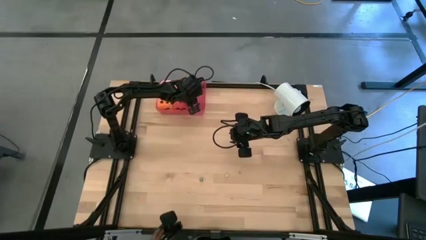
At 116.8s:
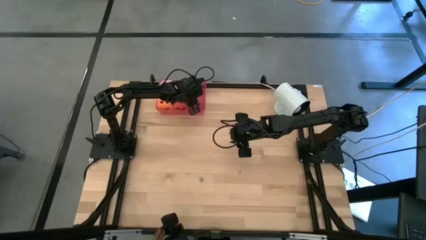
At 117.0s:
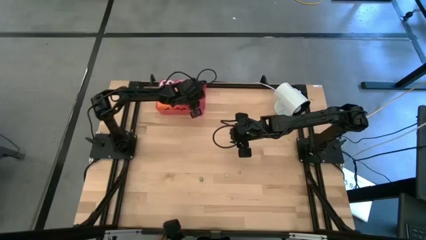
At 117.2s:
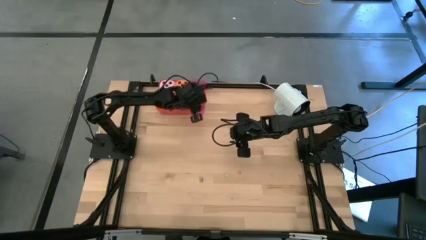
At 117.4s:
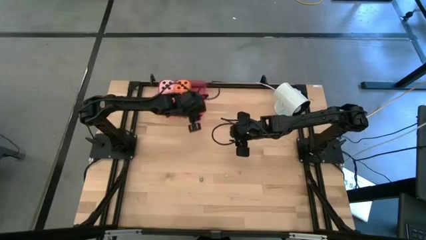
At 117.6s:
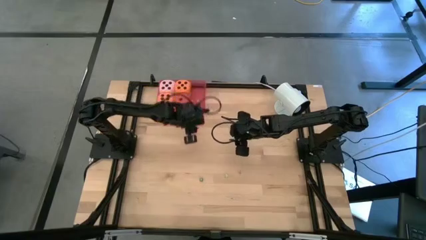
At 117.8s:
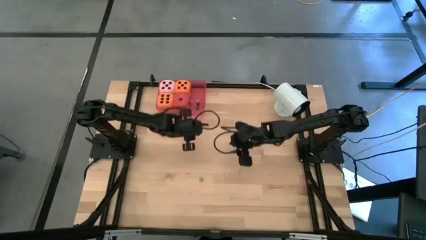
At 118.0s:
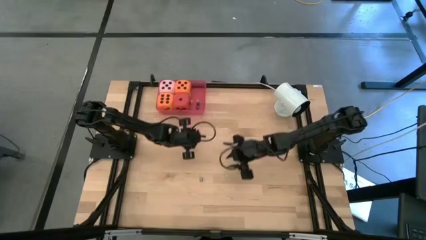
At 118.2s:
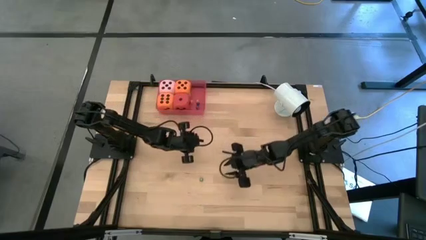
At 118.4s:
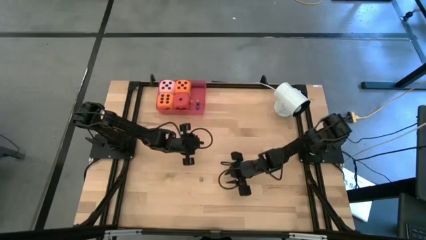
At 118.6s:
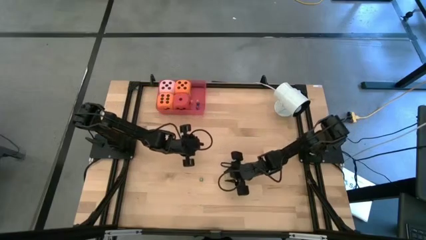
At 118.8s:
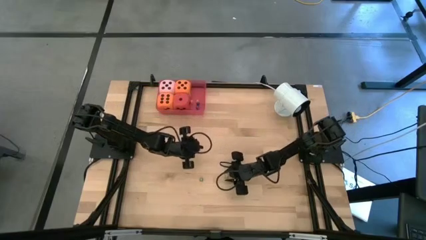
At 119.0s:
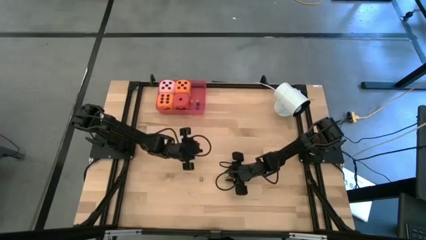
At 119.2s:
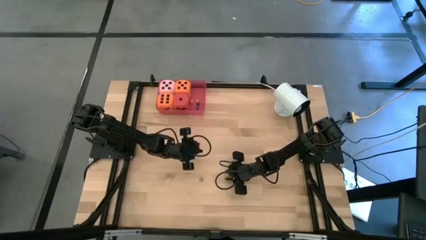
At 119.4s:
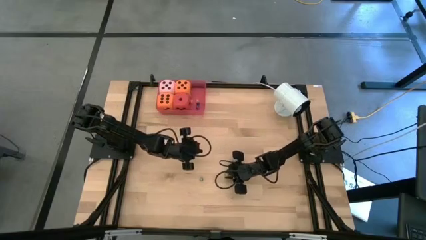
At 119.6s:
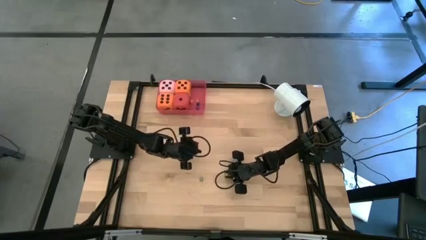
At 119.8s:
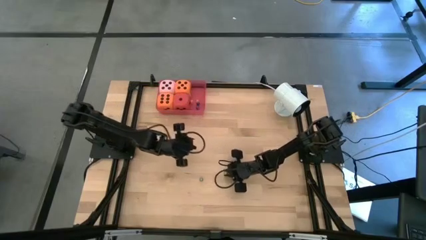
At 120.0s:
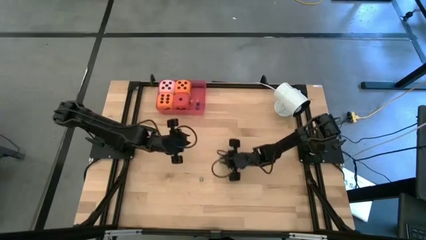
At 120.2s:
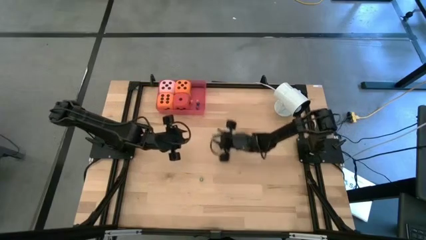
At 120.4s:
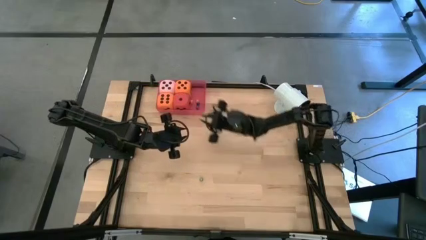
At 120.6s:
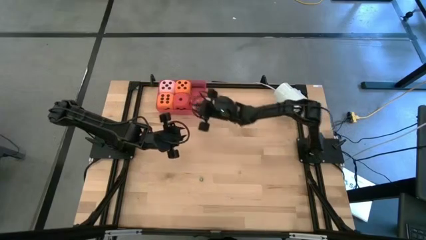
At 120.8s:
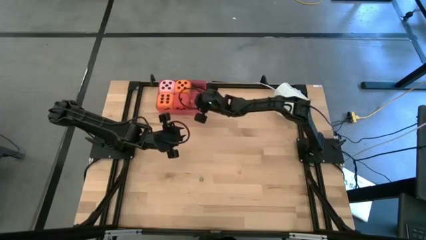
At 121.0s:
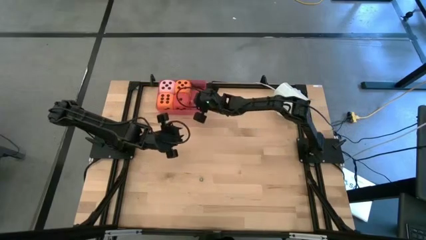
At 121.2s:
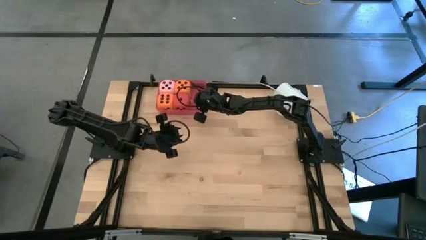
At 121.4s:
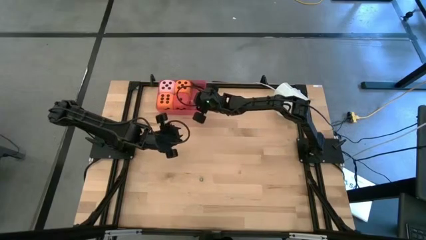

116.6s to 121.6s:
Task: Pick & Place Dice
Put the small light green die into the red bin

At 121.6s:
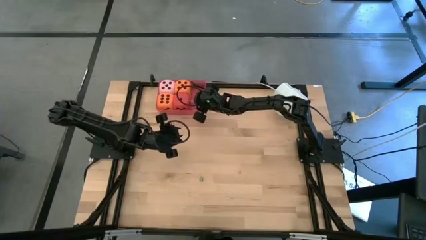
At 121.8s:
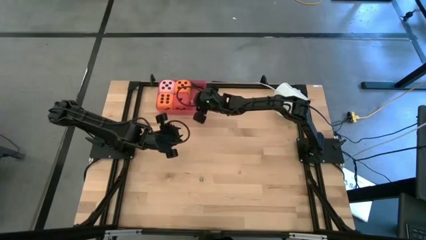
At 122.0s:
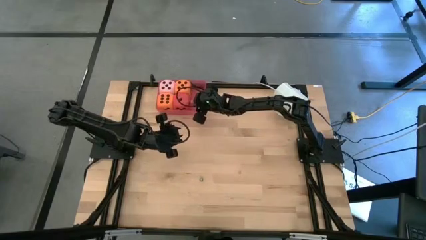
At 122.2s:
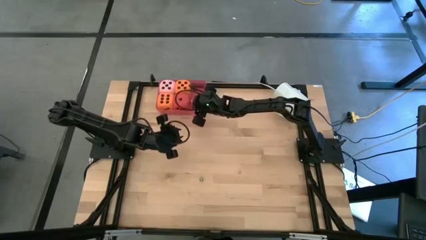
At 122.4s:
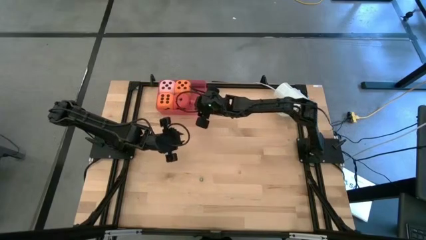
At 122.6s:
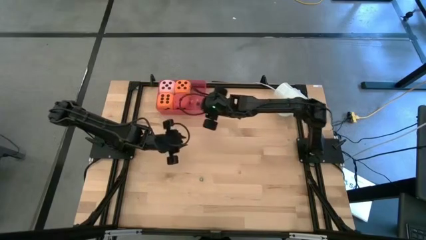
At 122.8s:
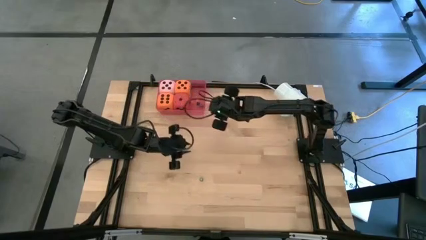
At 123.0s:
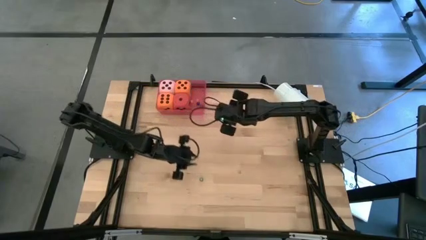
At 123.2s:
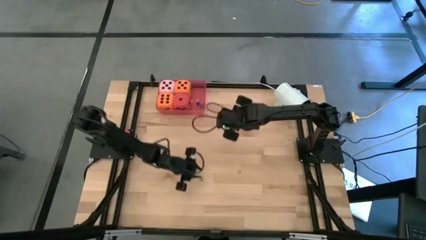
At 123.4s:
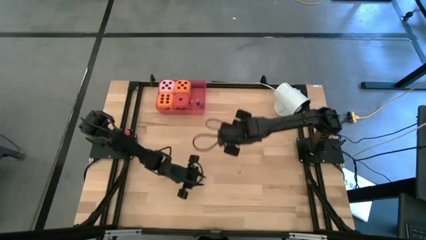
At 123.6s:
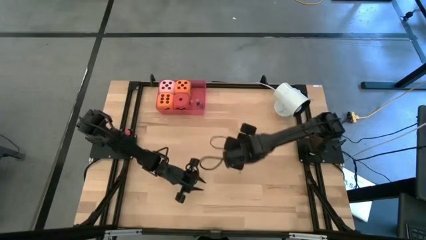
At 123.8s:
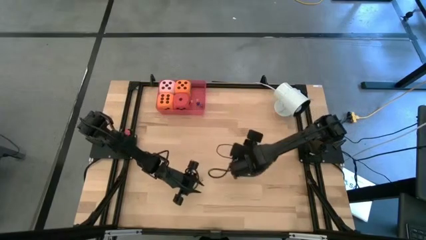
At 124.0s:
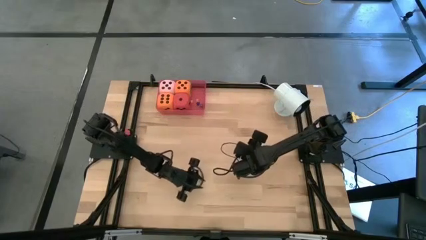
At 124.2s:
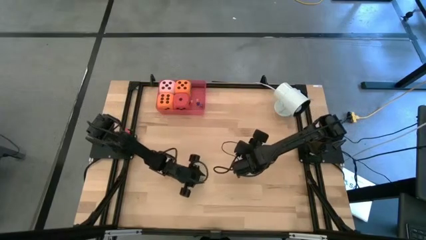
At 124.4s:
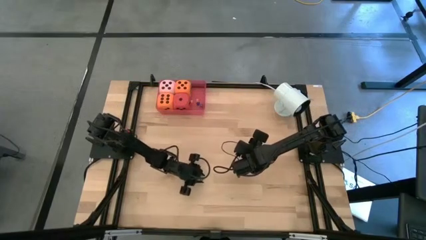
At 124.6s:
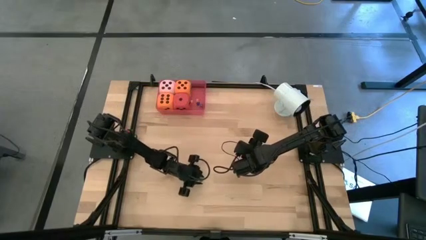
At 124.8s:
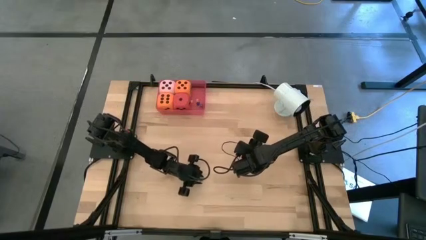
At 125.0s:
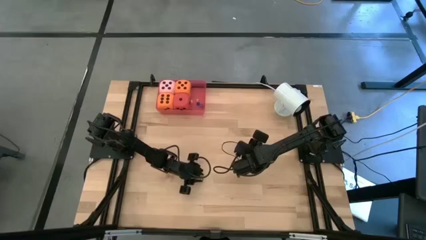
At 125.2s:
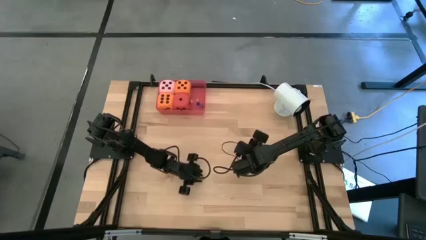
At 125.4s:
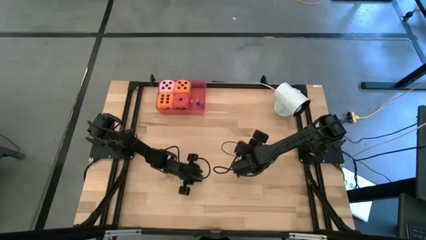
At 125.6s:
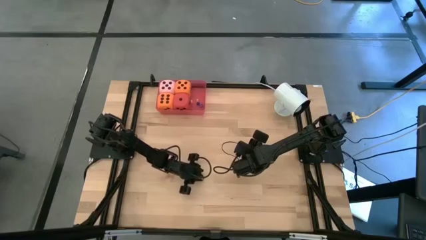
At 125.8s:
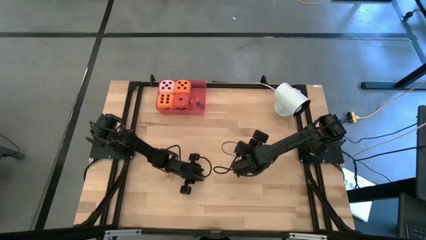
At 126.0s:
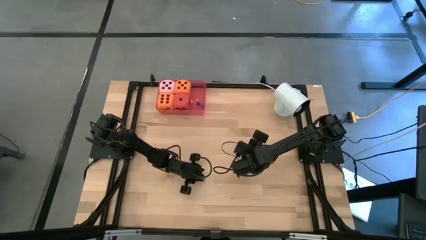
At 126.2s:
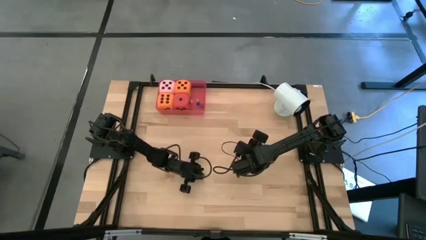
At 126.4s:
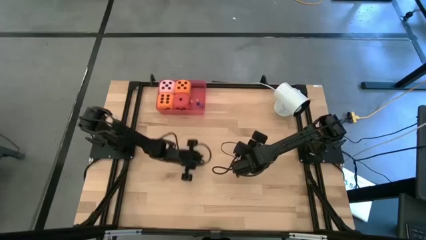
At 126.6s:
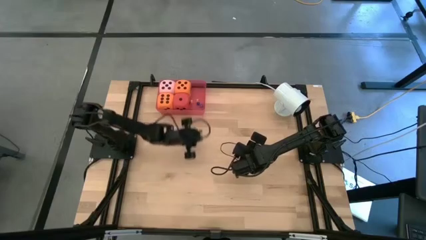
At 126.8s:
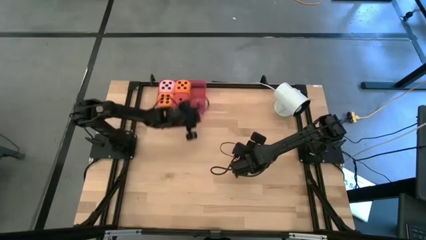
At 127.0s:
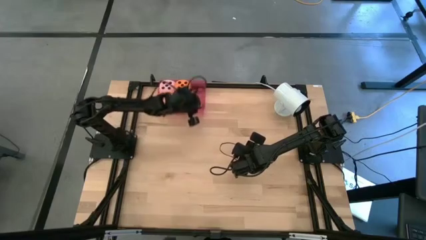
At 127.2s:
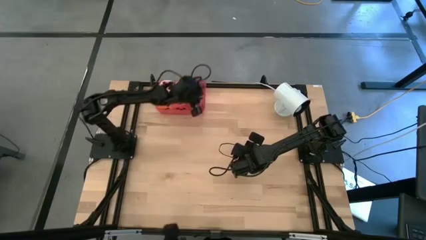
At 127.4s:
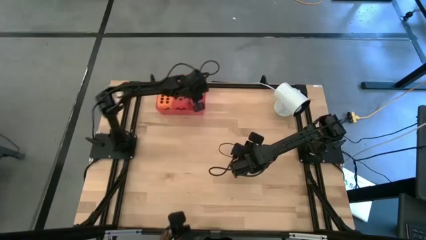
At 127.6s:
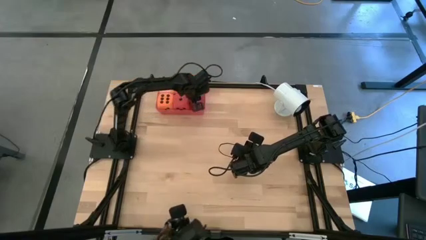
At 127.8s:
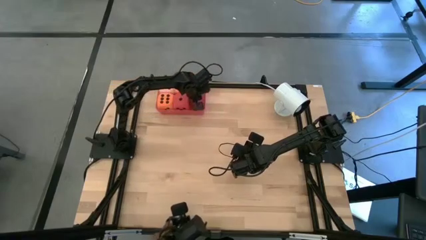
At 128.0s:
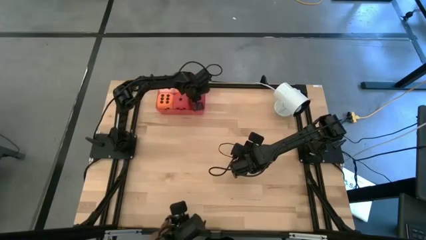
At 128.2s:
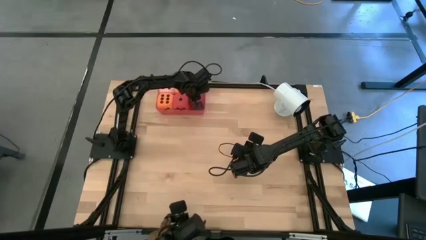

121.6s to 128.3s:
Put the small green die into the red bin

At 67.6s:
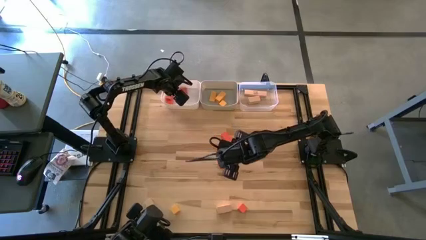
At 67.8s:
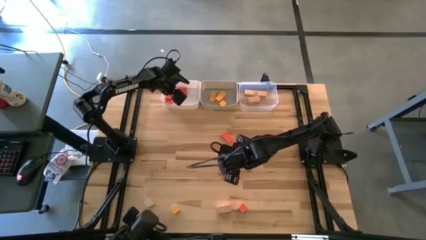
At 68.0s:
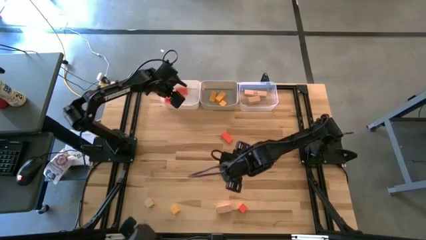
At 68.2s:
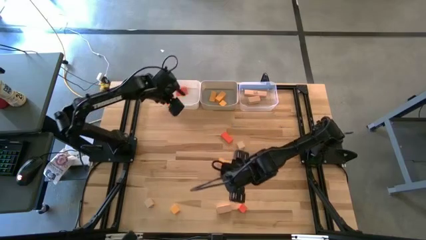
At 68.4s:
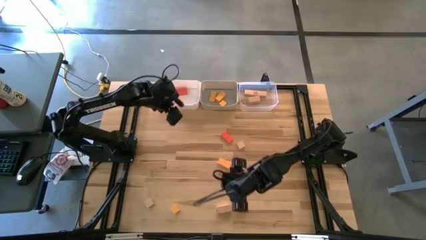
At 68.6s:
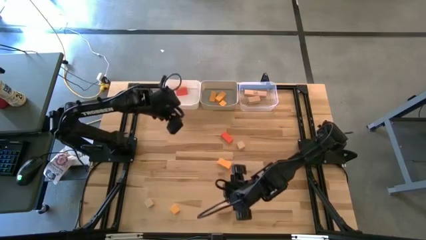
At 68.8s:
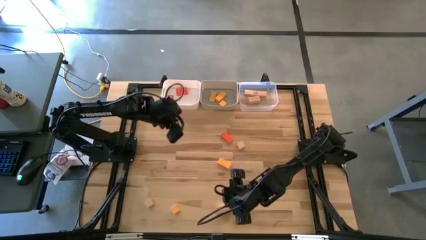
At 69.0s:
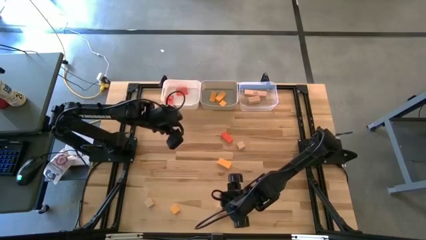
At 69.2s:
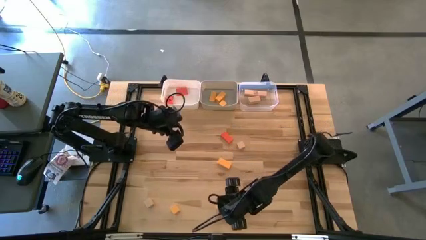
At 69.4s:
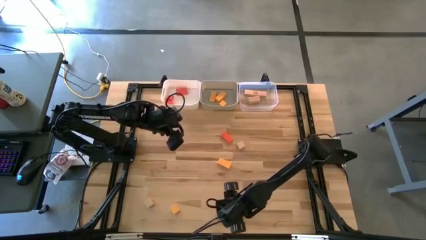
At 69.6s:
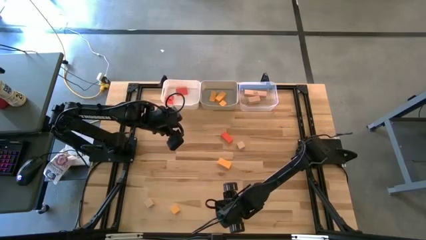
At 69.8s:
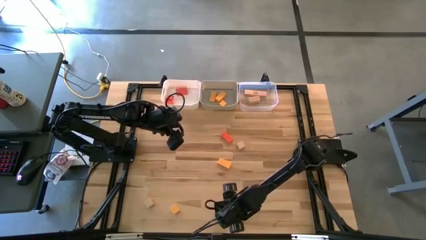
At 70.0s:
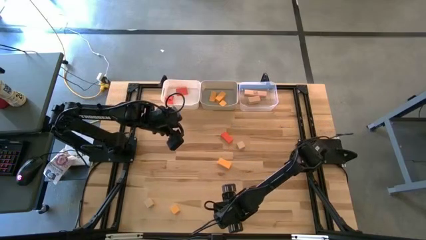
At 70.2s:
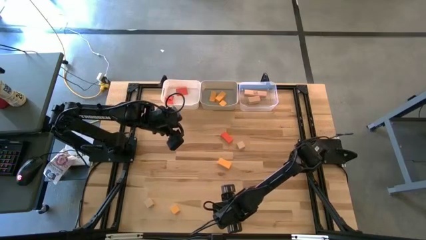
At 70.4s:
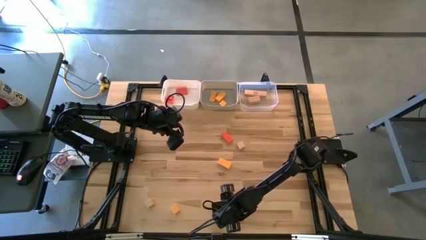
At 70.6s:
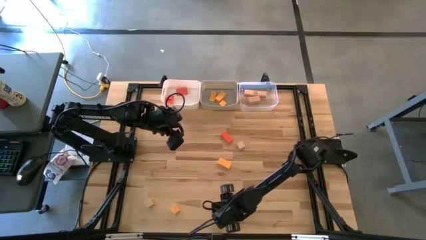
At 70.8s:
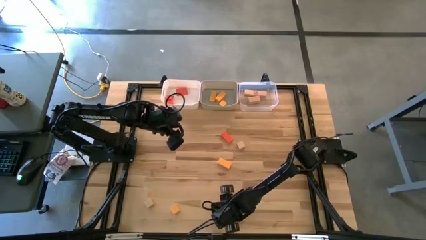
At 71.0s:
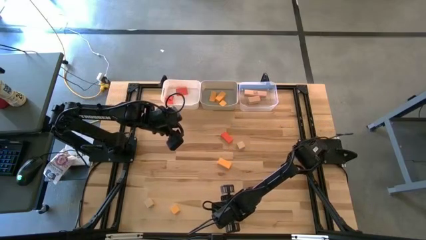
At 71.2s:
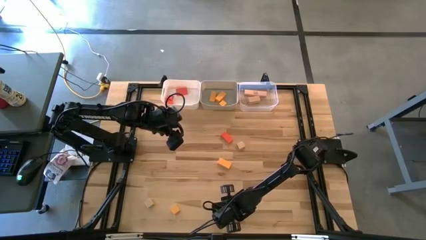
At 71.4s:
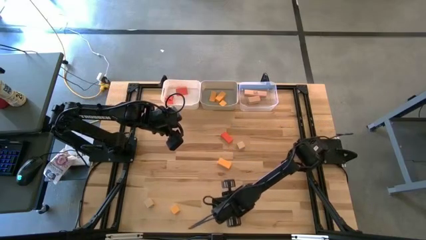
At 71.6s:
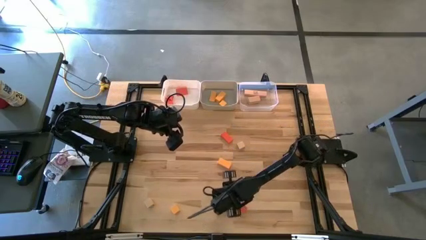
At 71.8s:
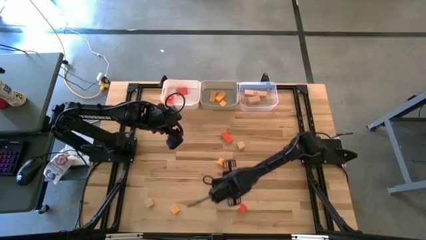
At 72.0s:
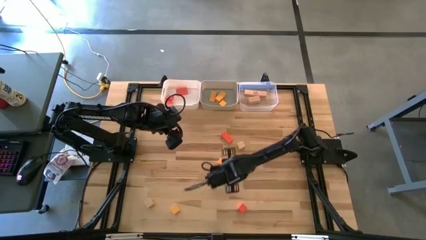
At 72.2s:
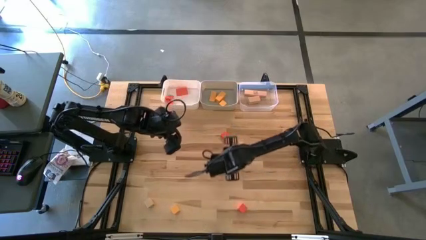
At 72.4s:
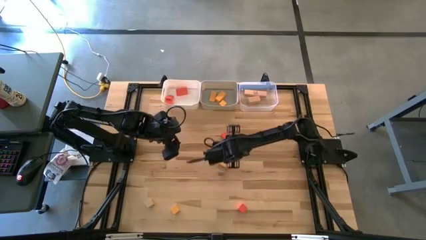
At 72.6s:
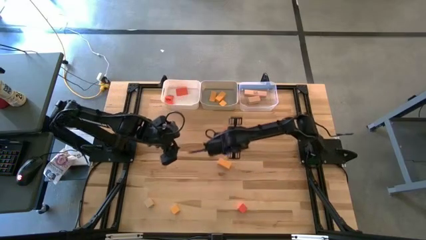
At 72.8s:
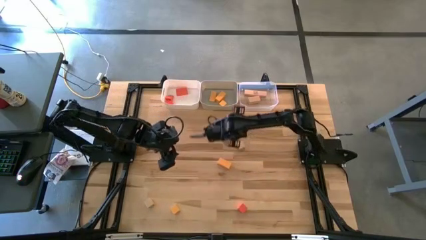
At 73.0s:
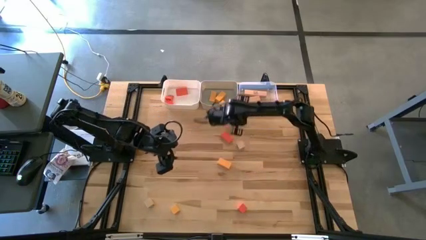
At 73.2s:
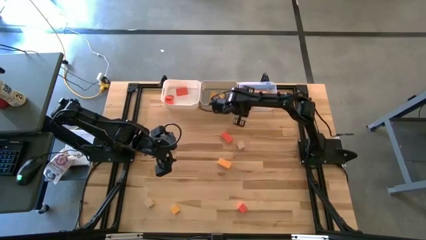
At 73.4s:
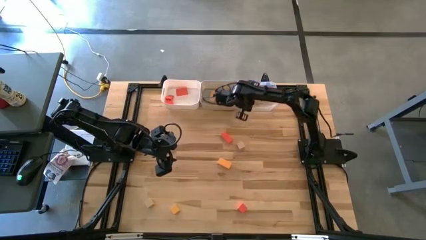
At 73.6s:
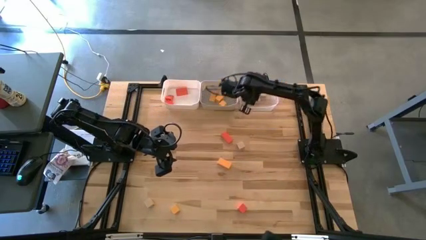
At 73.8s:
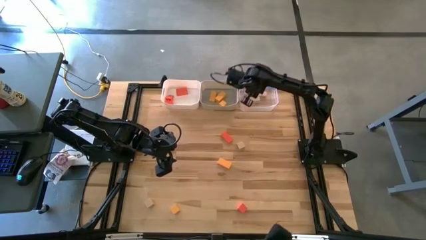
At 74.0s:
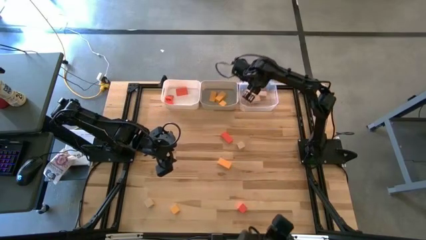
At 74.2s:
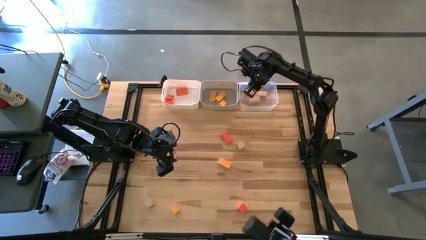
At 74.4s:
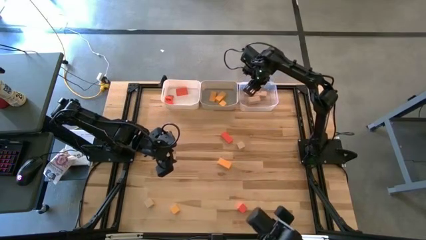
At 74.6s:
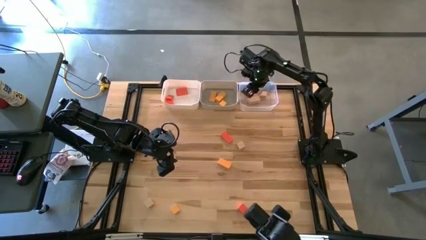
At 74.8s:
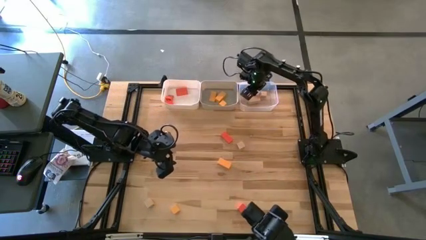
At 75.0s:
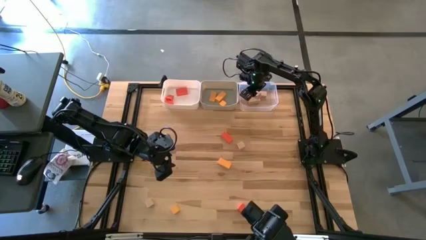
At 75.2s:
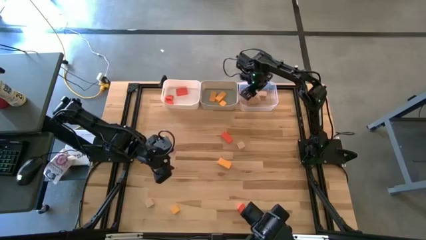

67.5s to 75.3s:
Task: Sort & place blocks by color
Put the brown block into the transparent bin
